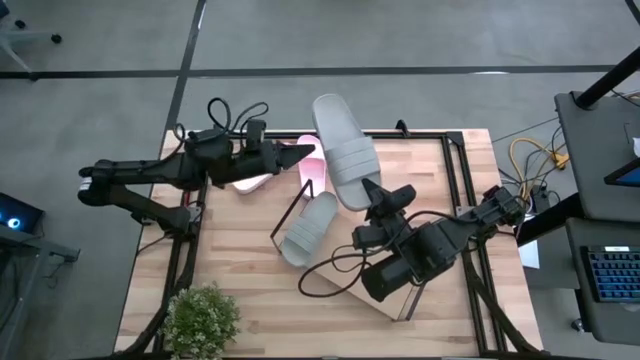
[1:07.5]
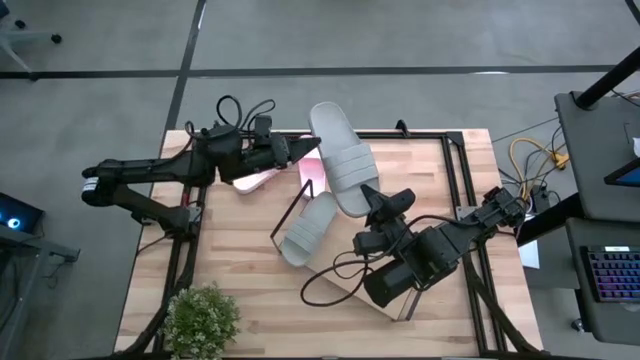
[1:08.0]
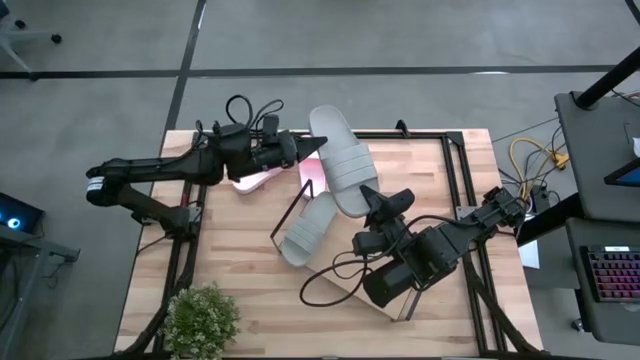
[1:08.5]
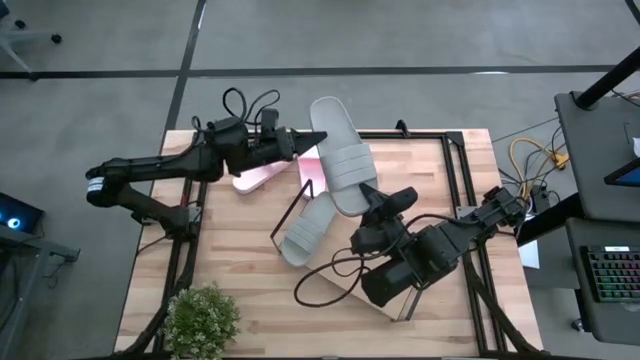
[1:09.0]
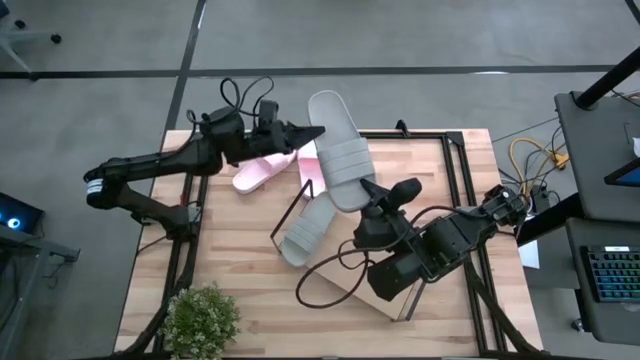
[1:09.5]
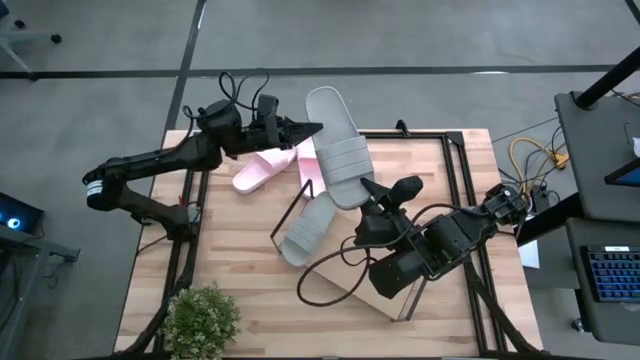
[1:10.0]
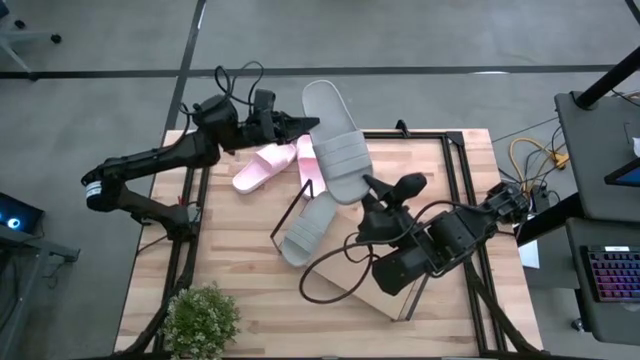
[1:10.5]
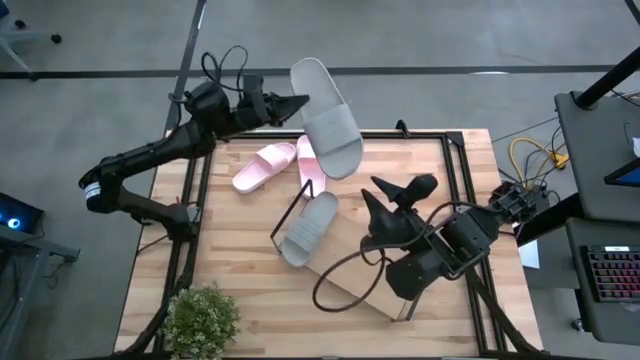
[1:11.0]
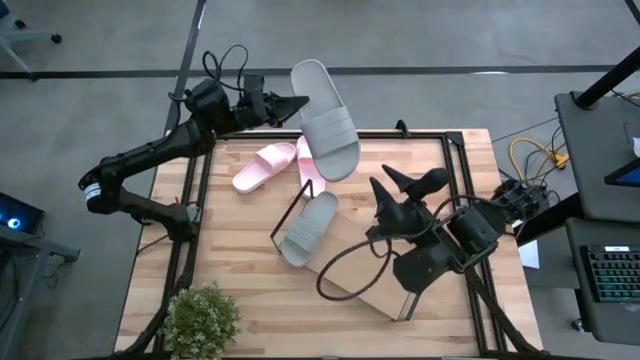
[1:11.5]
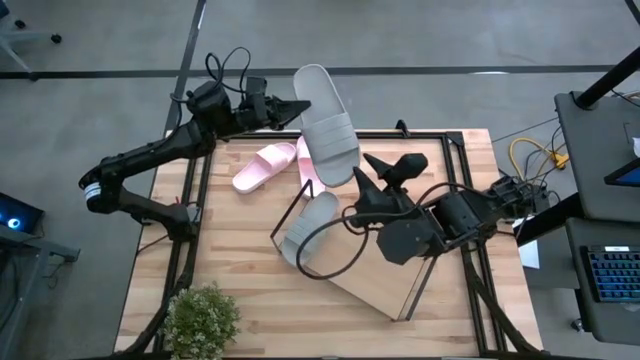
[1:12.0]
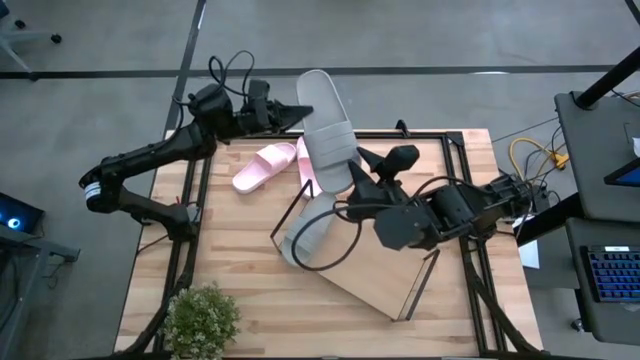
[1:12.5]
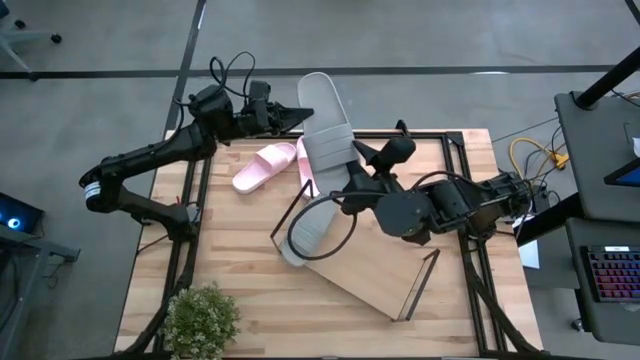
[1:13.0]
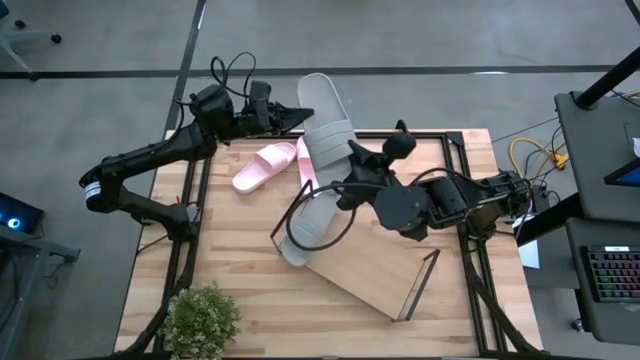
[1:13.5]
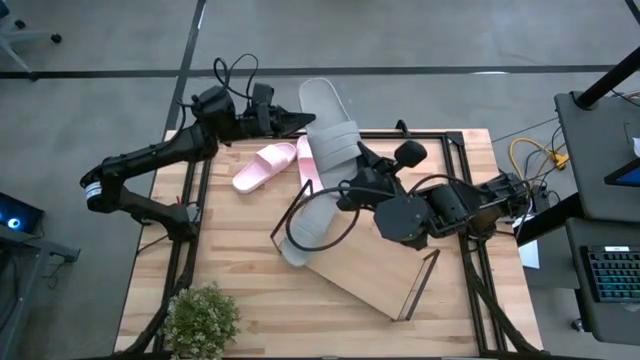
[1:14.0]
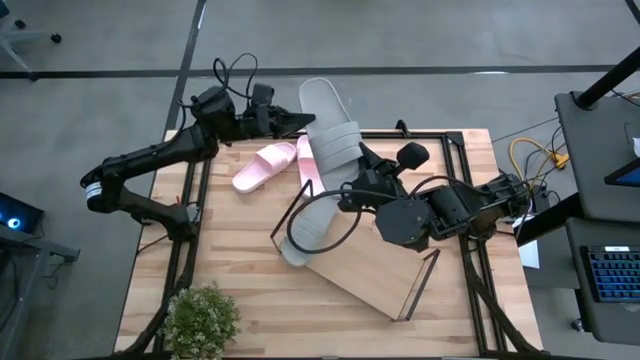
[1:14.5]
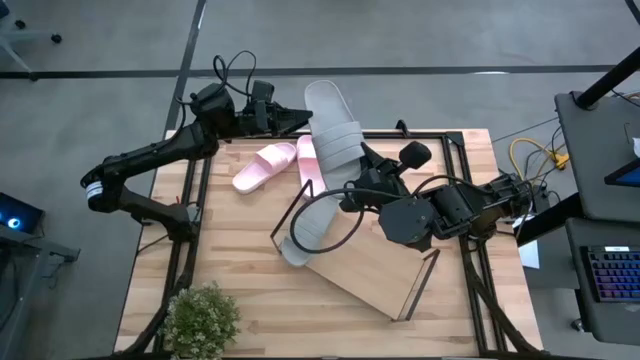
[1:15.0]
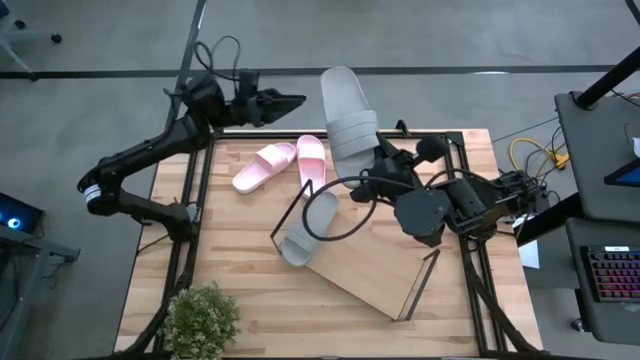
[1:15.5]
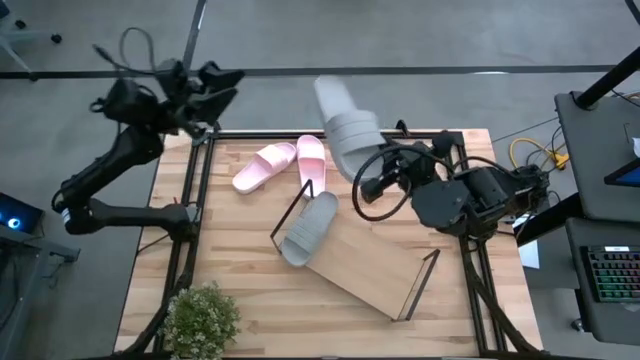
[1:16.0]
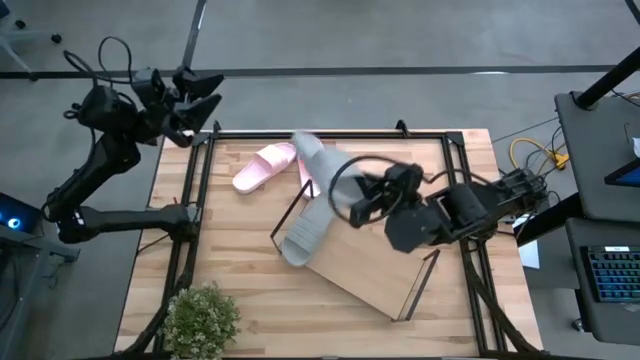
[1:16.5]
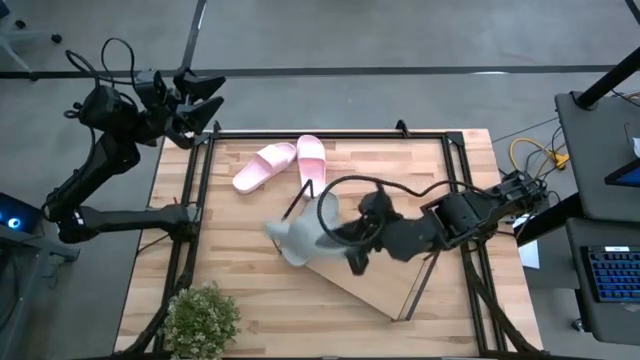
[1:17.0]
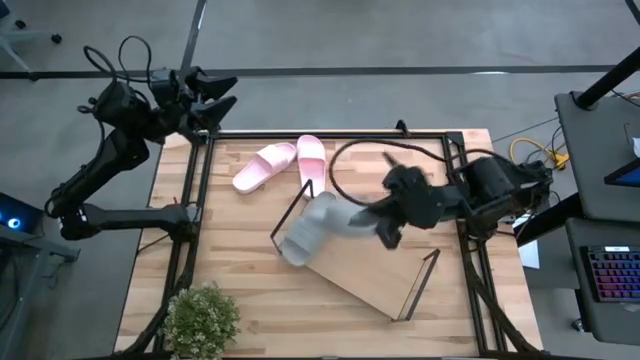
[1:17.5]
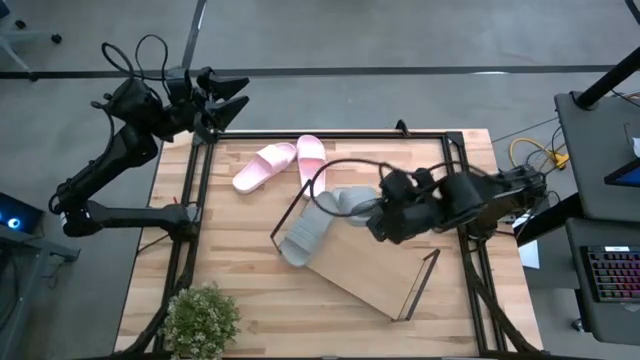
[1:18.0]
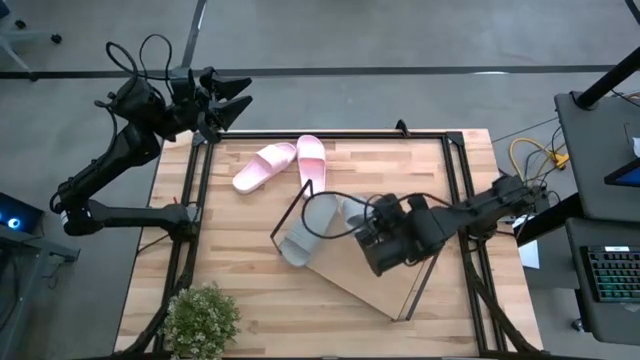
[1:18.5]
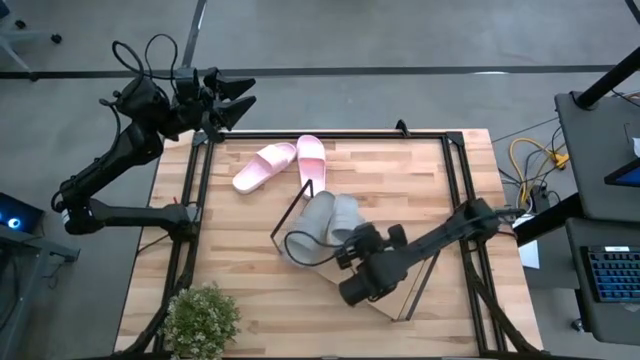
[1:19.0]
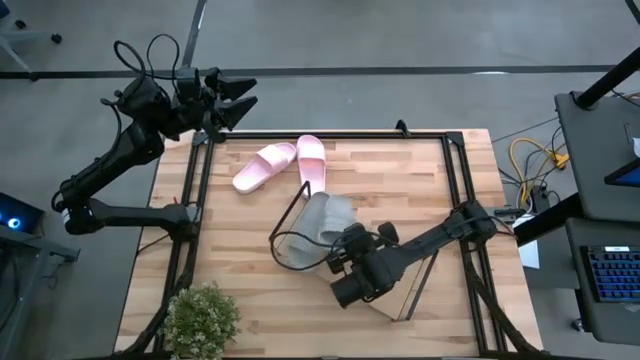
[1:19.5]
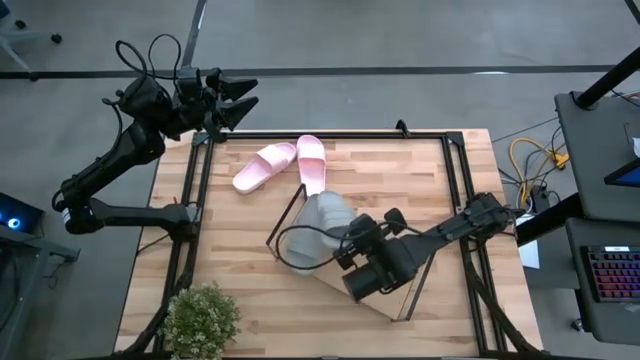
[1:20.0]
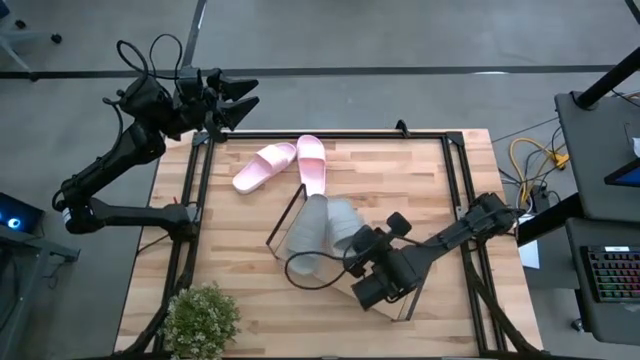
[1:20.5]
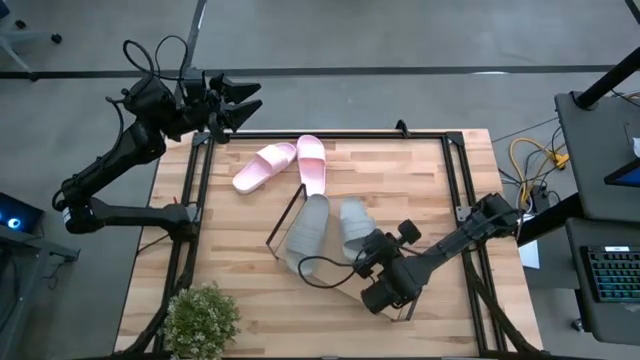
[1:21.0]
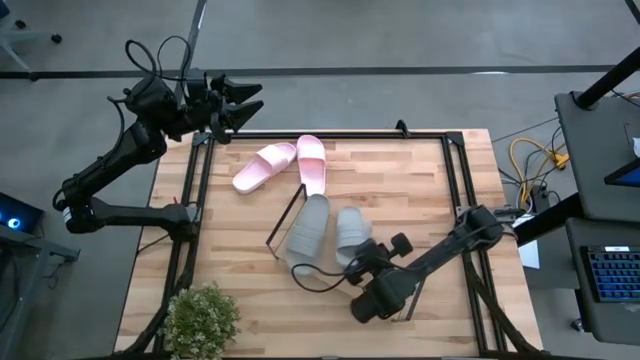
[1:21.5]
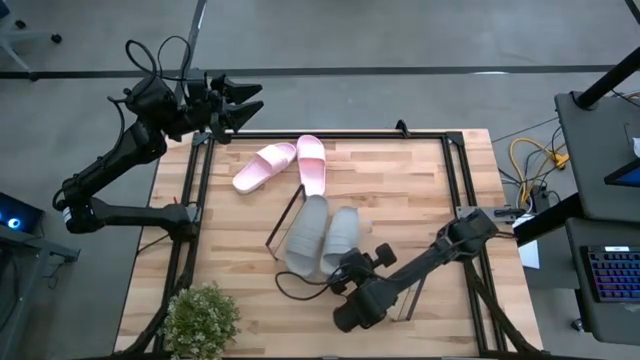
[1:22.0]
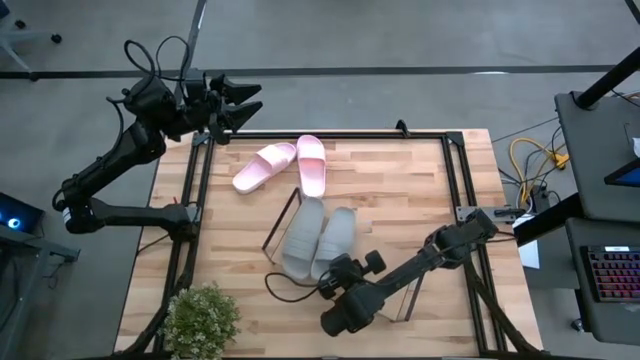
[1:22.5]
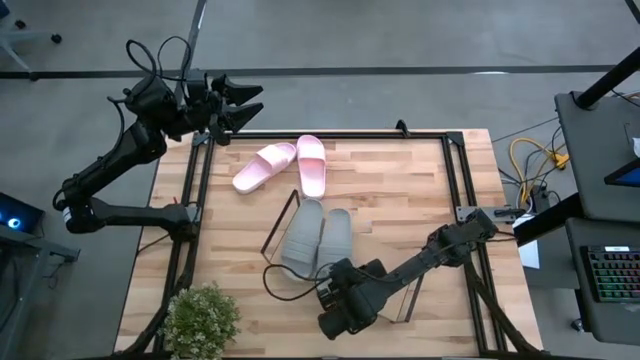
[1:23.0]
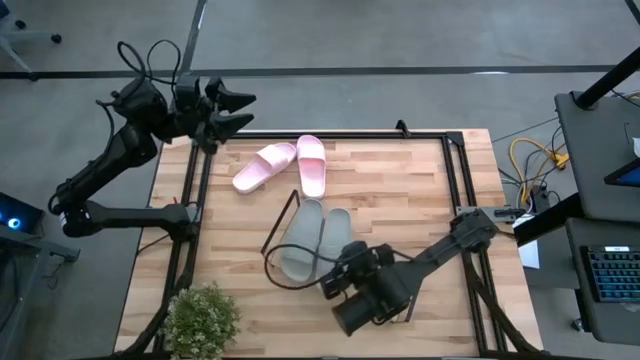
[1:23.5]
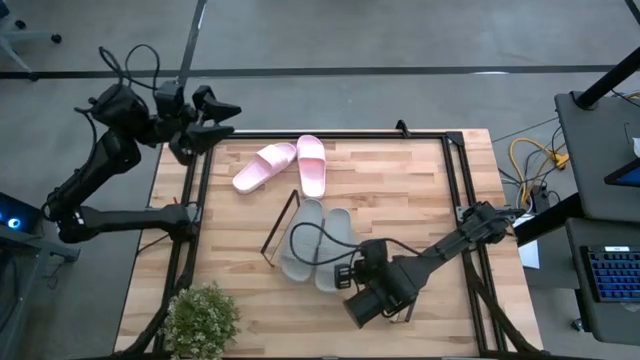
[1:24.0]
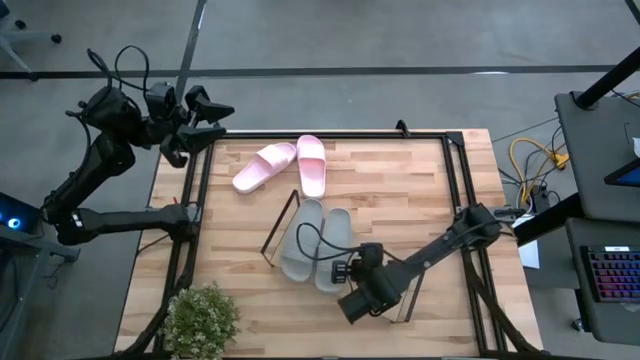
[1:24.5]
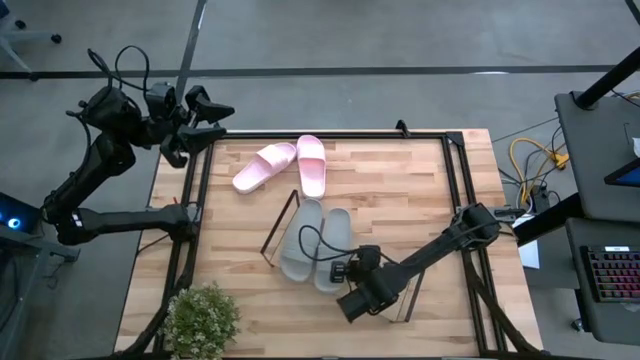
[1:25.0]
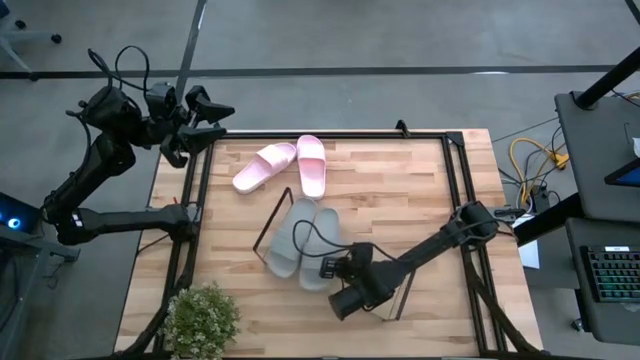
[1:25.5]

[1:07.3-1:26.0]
Task: Pick and place slides into the shelf
Put the gray slipper on the shelf
